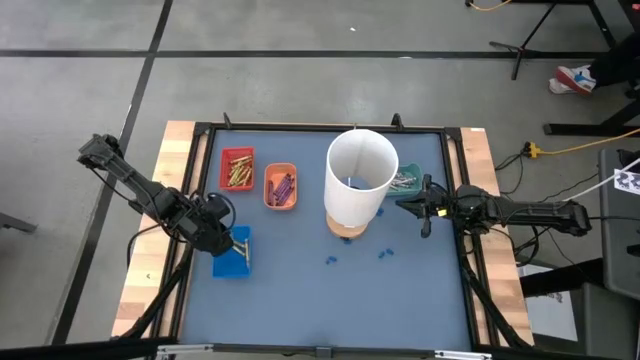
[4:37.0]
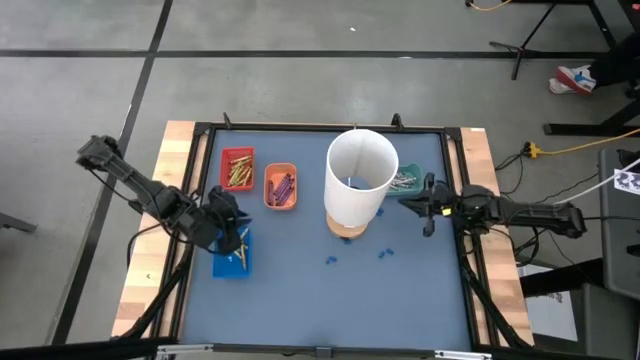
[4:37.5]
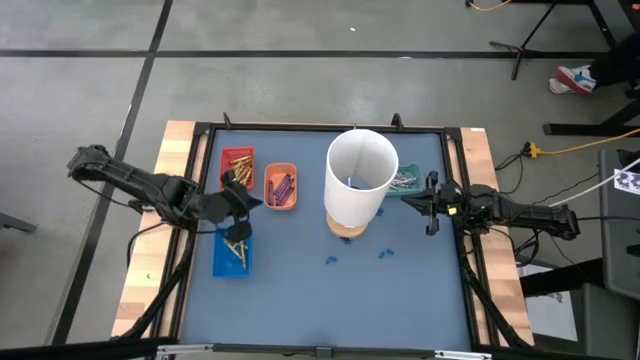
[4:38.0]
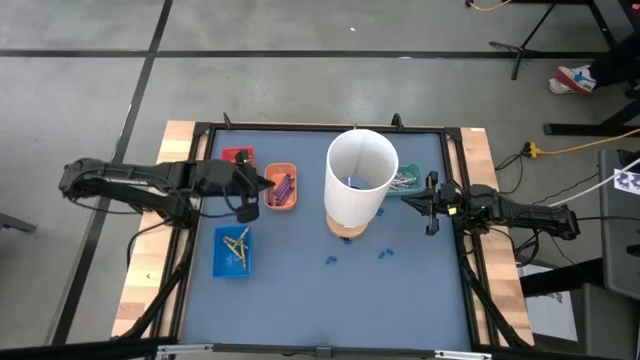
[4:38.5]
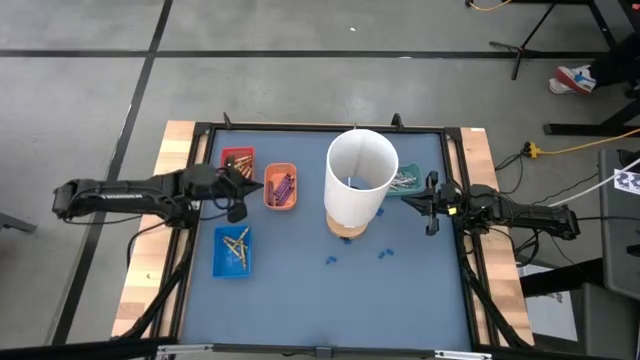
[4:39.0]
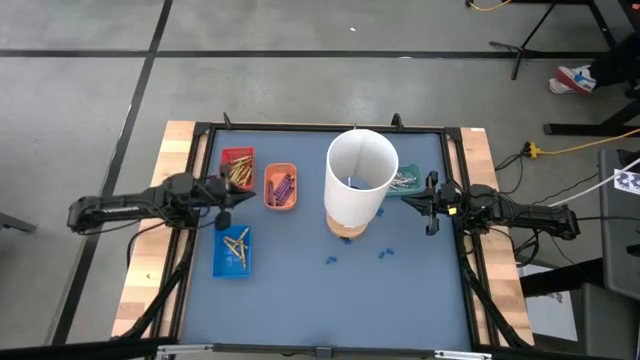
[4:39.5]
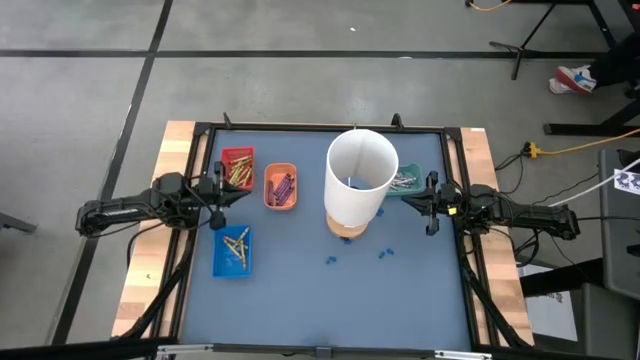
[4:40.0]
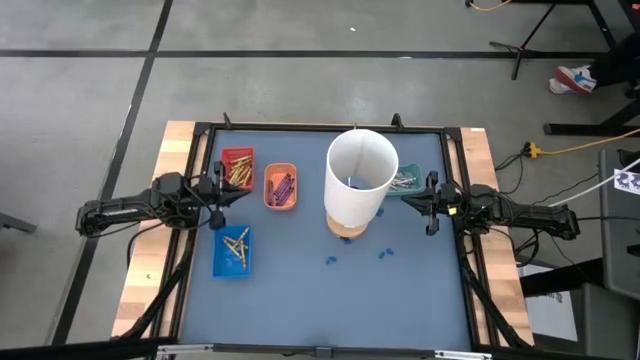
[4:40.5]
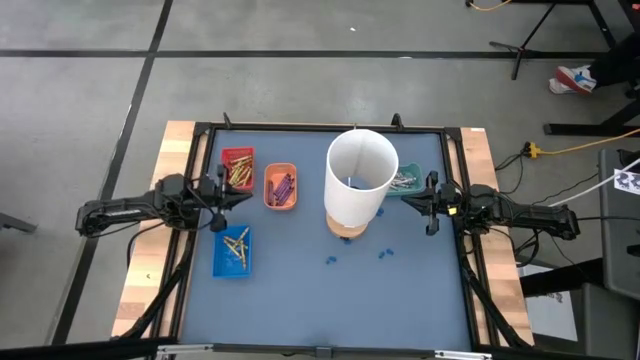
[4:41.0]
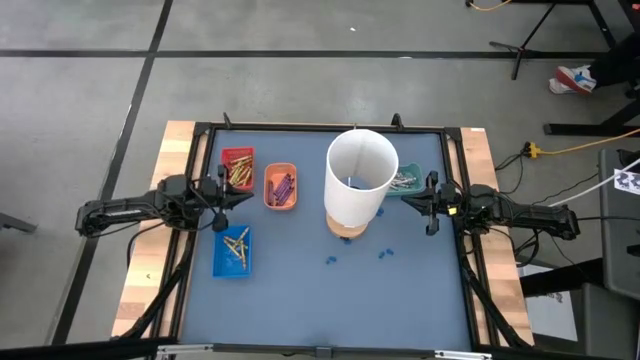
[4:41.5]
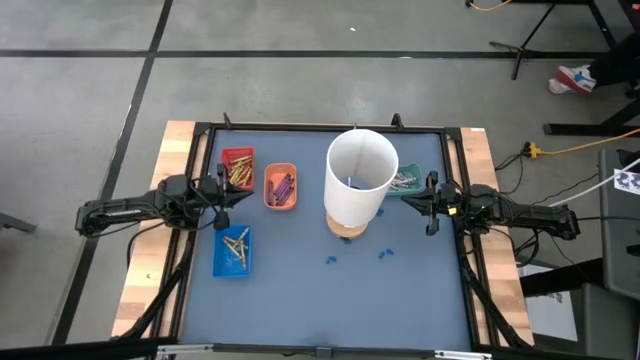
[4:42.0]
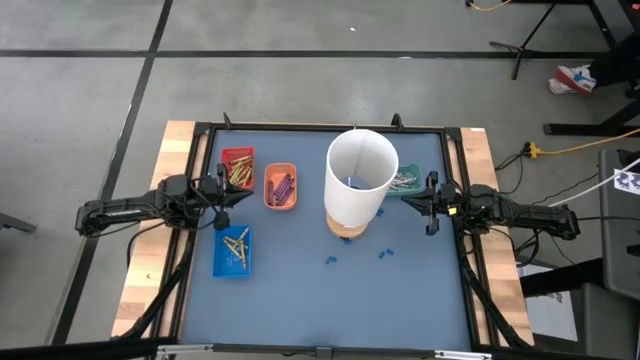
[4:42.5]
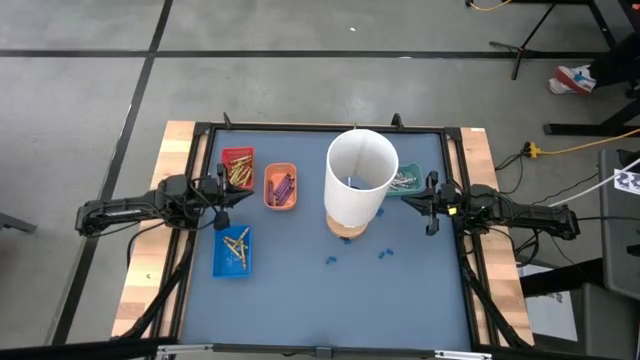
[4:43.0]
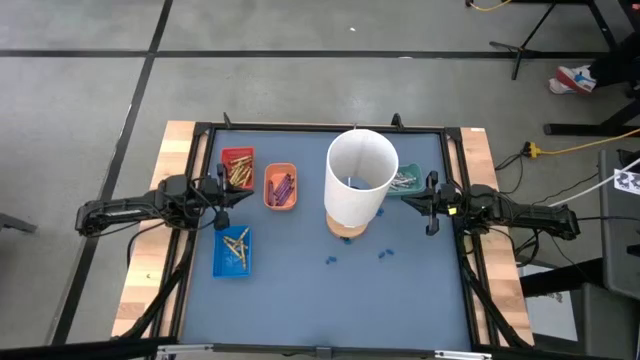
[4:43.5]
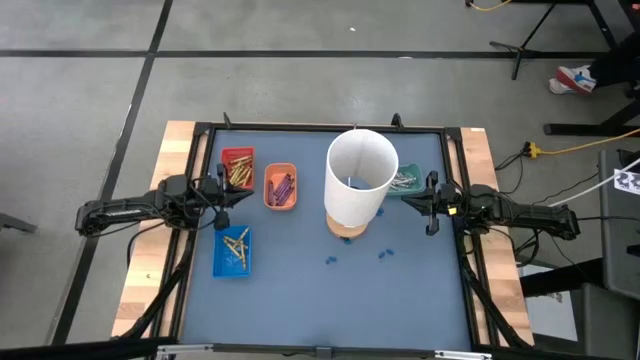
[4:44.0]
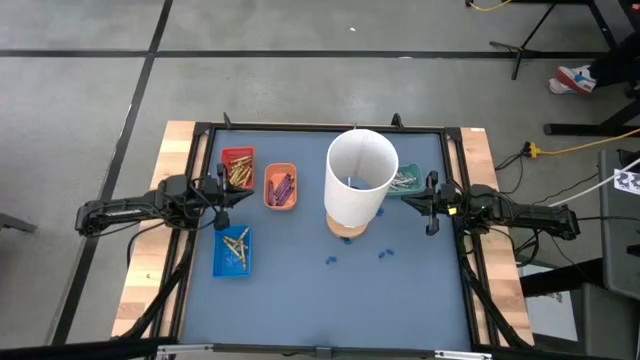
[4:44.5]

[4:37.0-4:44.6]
Task: Sort crayons
Return to Home Position

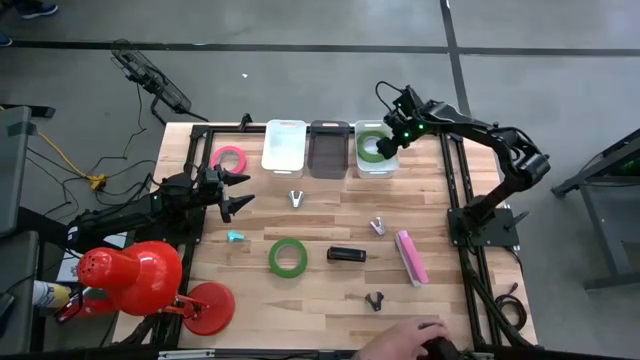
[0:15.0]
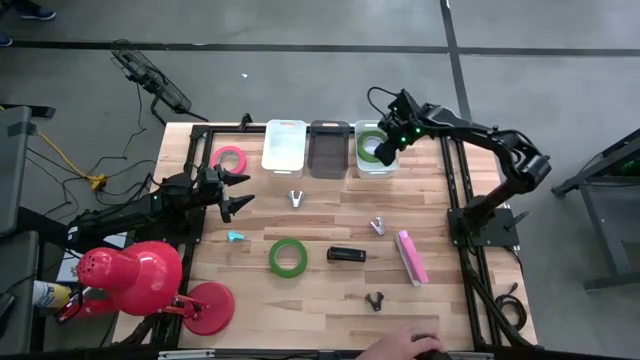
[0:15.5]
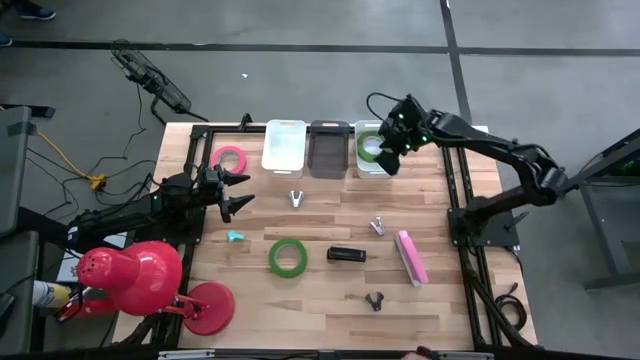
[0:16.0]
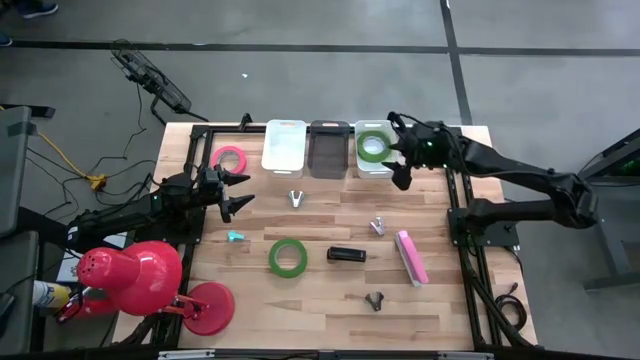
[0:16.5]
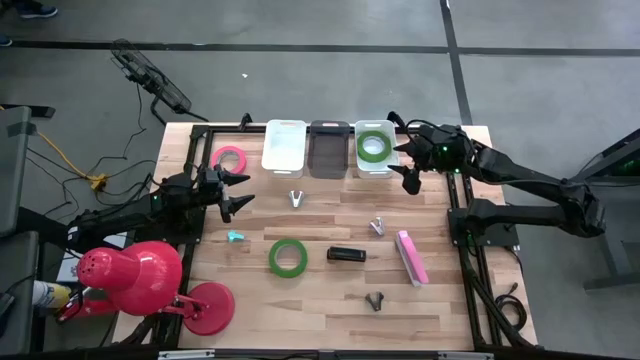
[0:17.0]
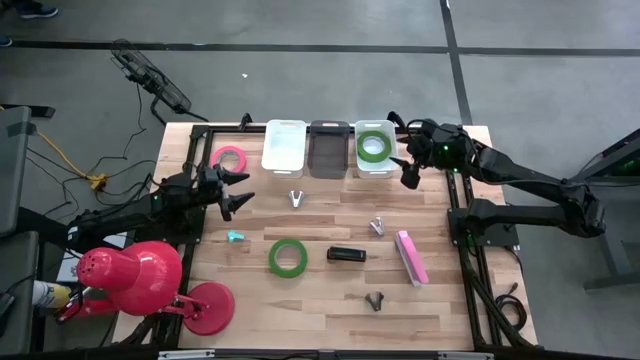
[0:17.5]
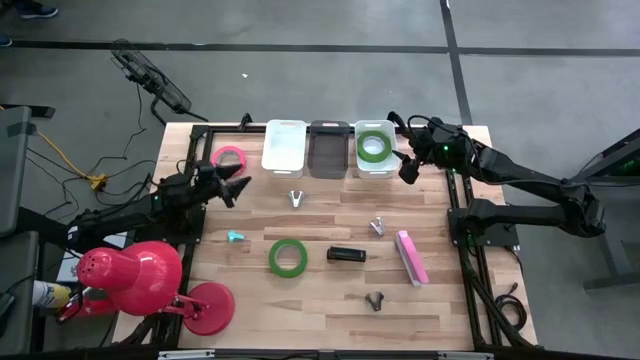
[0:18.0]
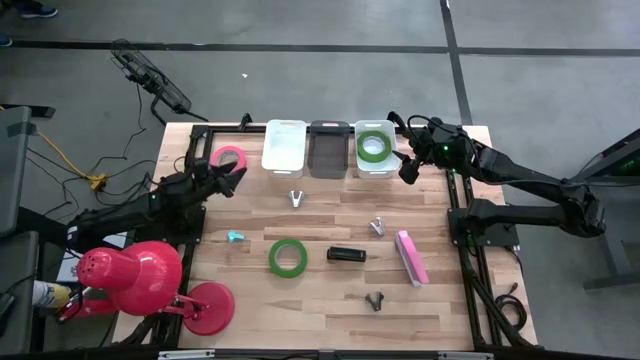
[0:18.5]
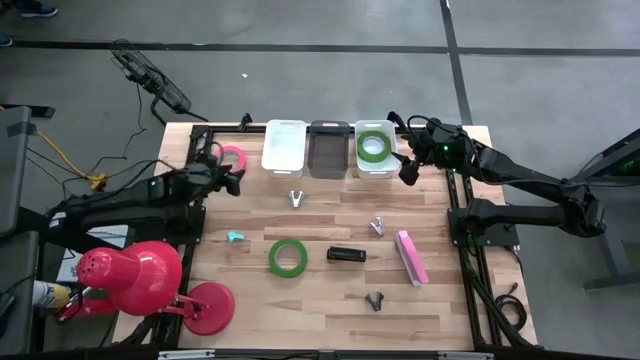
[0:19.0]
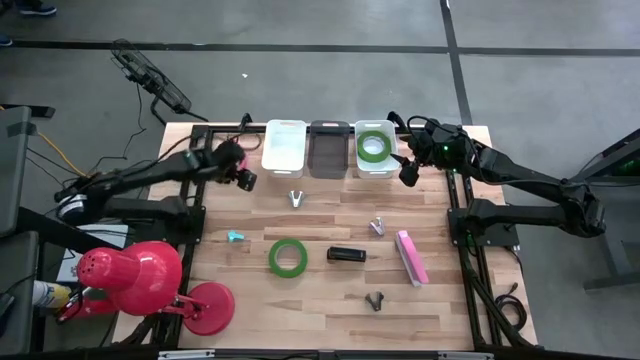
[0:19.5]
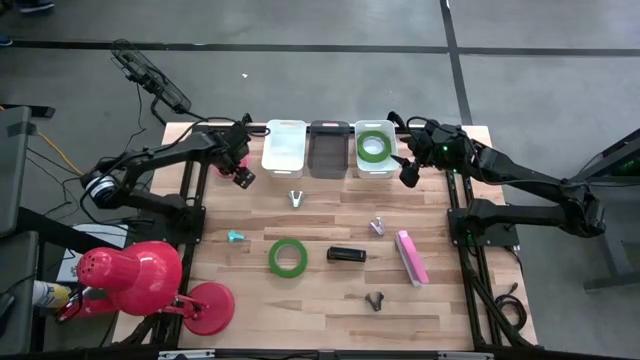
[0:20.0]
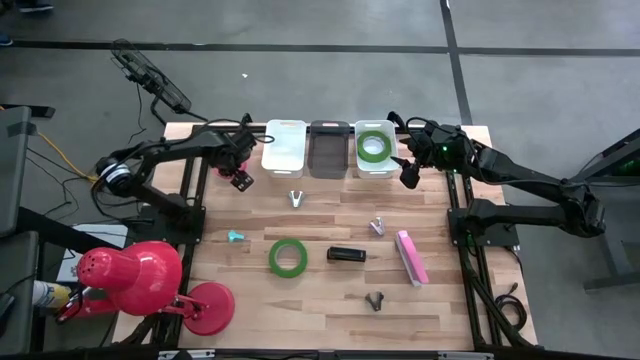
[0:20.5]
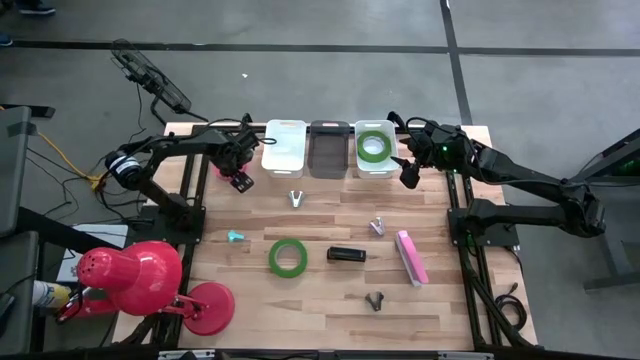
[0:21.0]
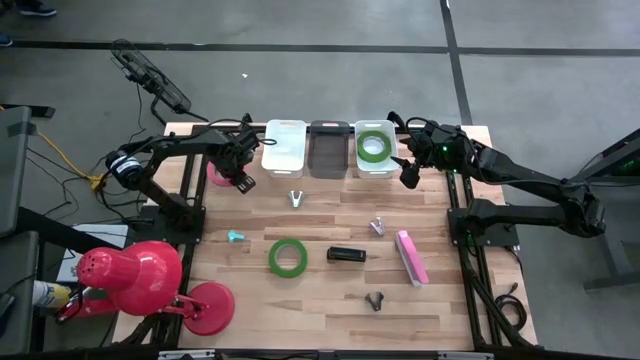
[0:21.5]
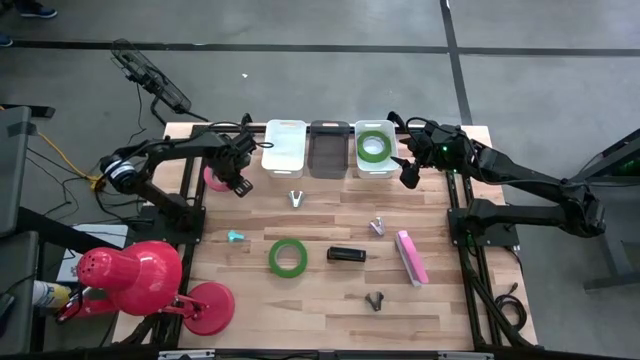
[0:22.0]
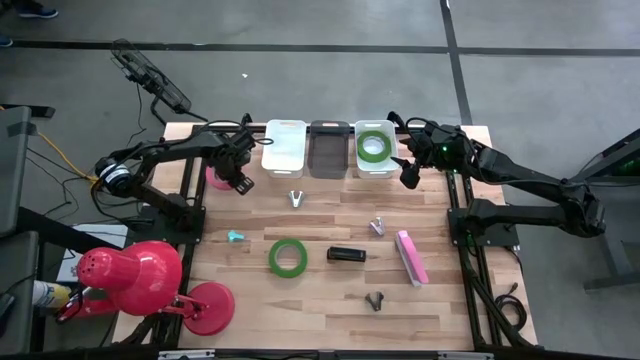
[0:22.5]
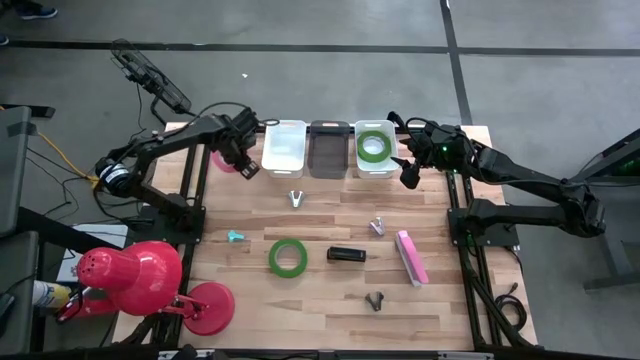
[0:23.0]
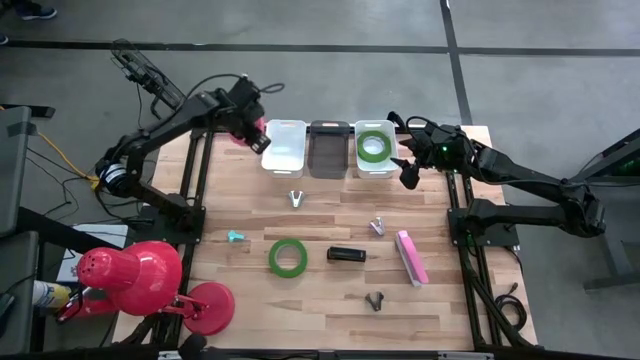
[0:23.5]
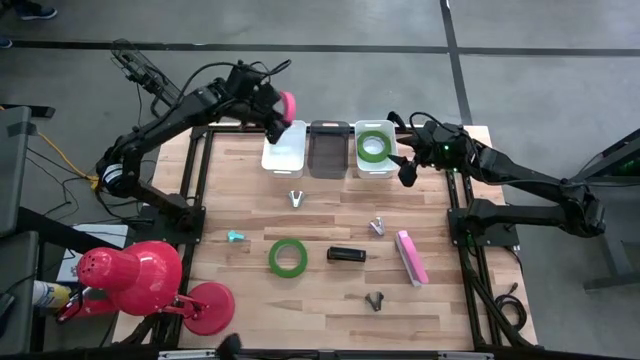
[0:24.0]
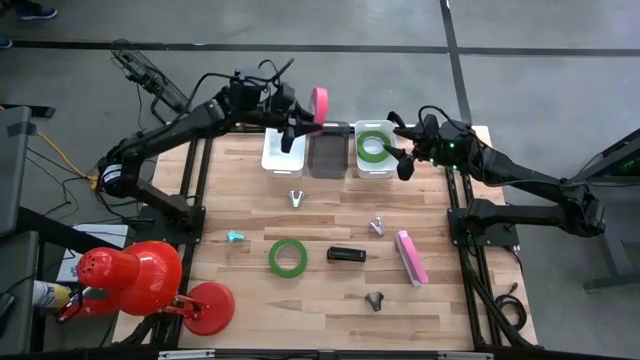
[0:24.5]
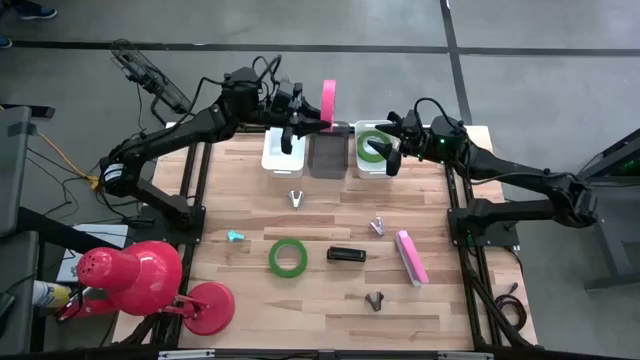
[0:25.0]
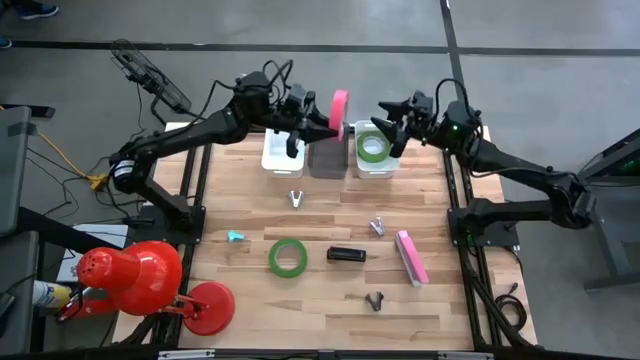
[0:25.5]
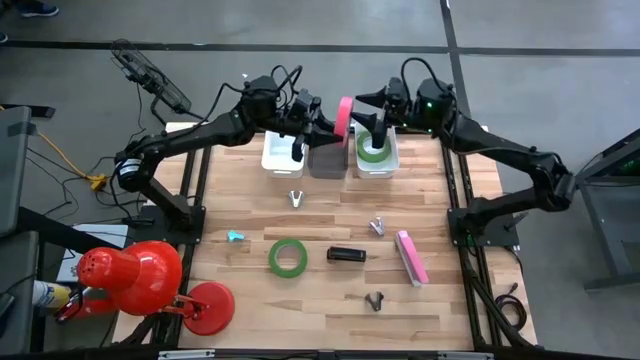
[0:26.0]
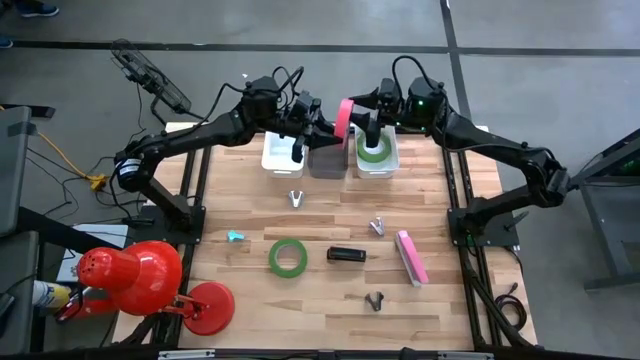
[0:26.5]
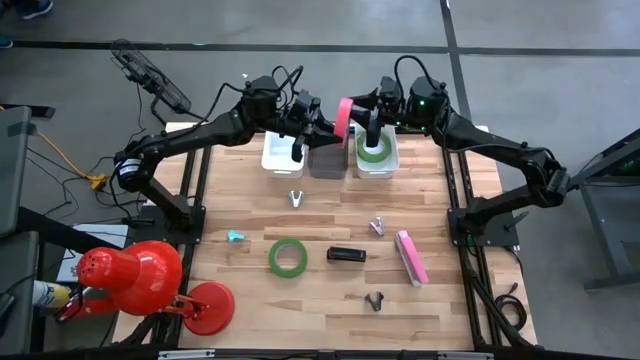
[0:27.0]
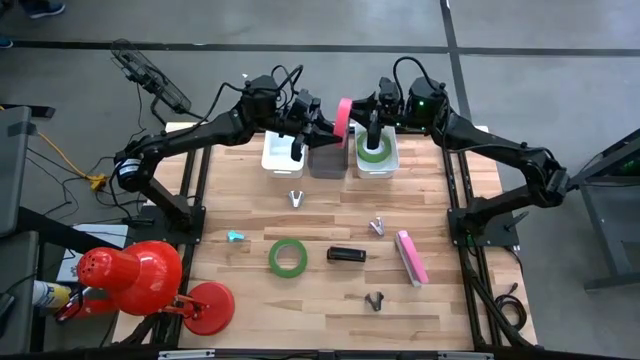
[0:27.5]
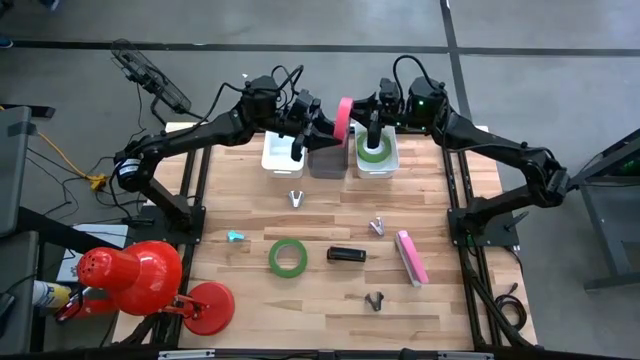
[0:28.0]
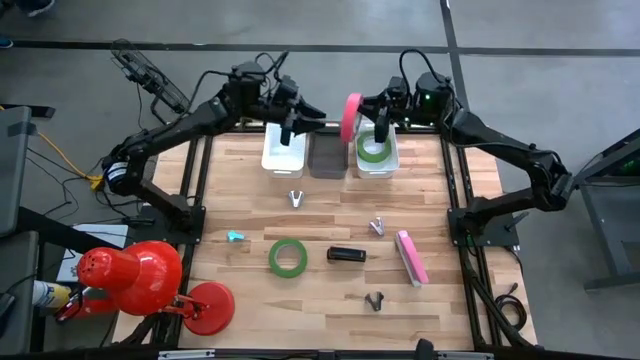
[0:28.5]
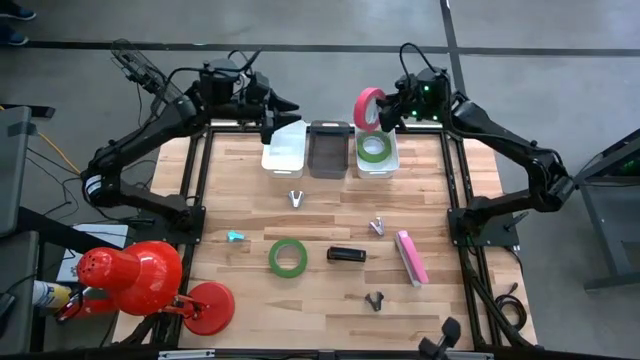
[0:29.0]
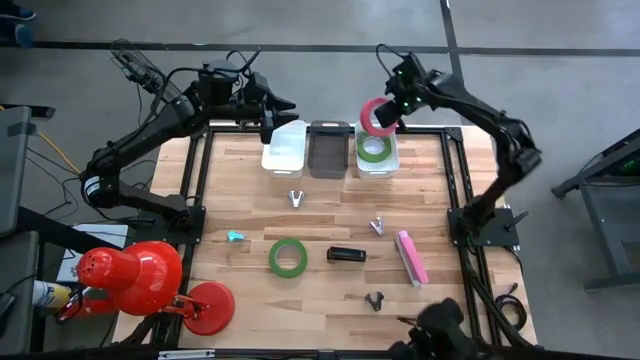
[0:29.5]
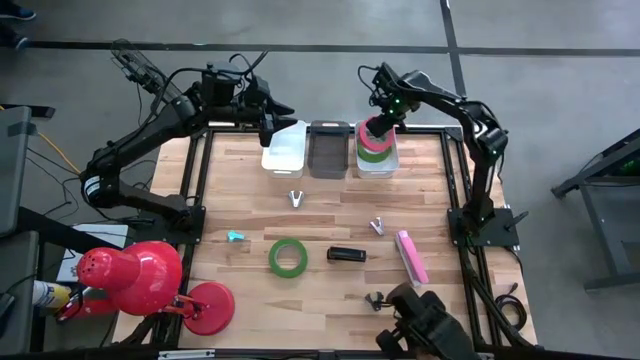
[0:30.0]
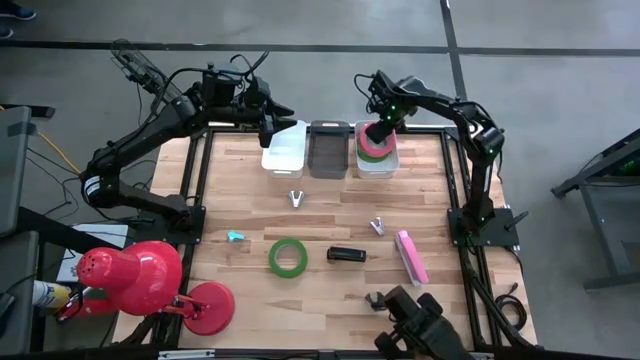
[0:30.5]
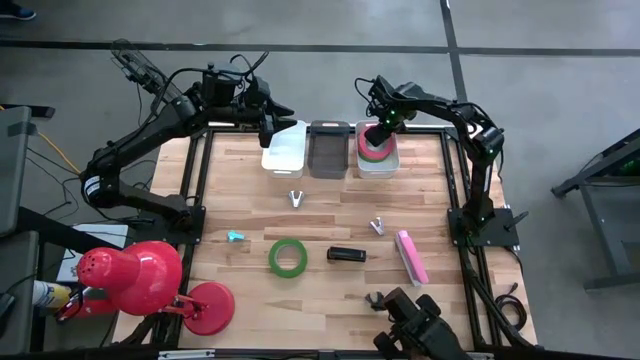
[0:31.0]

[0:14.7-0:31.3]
Task: Pick and place Stapler, Stapler remover, tape
Put the pink tape into the right white bin
